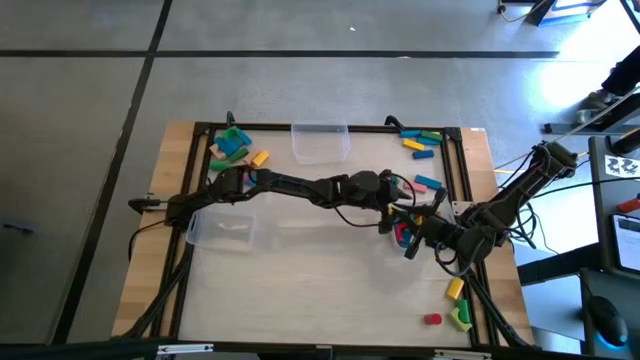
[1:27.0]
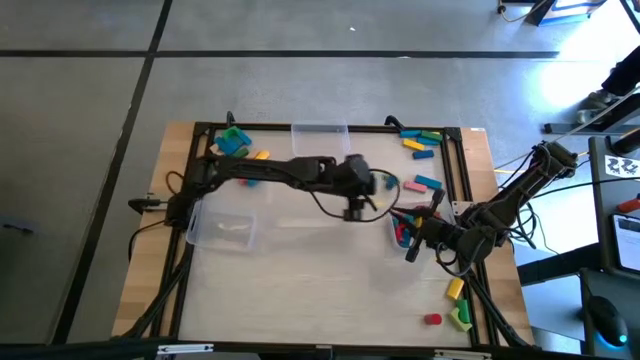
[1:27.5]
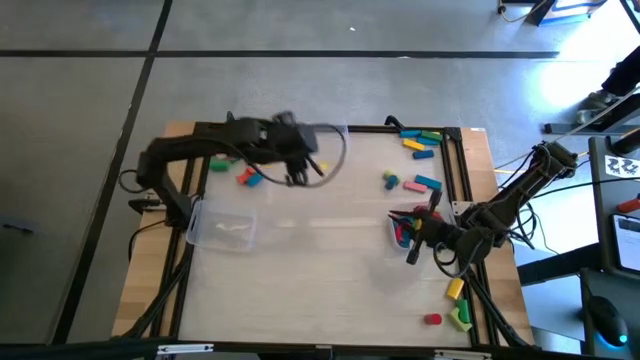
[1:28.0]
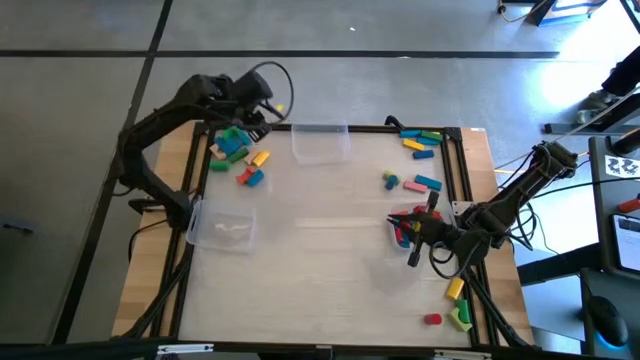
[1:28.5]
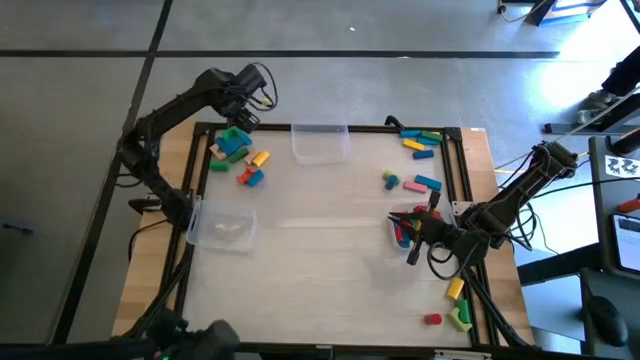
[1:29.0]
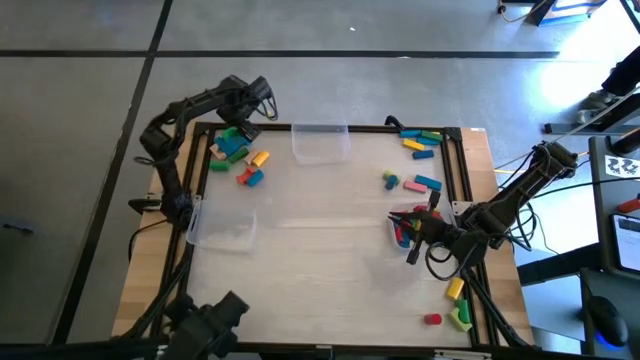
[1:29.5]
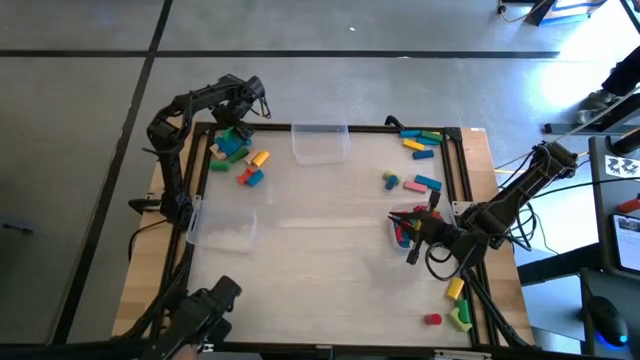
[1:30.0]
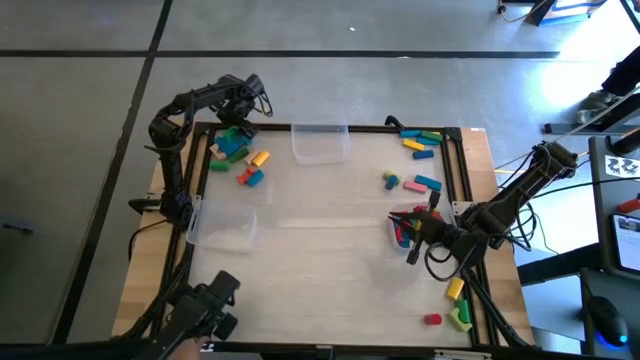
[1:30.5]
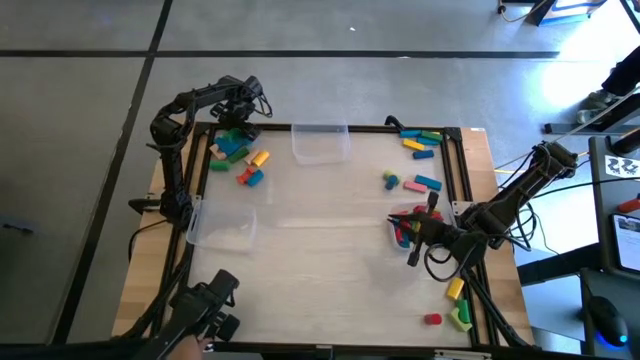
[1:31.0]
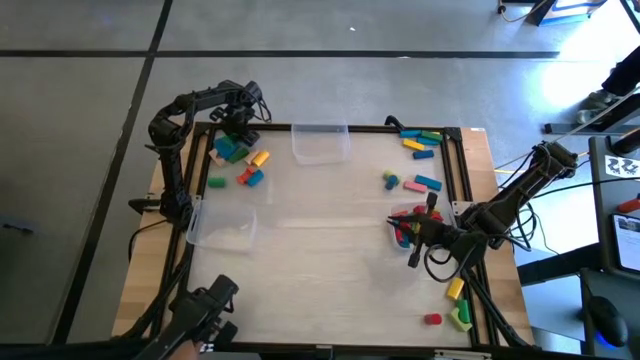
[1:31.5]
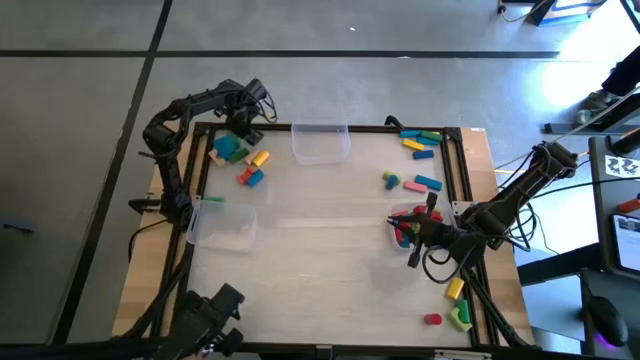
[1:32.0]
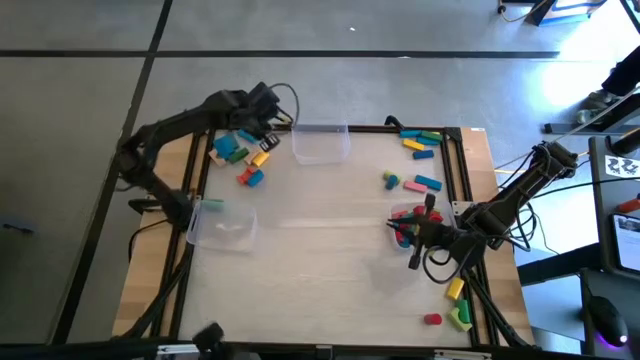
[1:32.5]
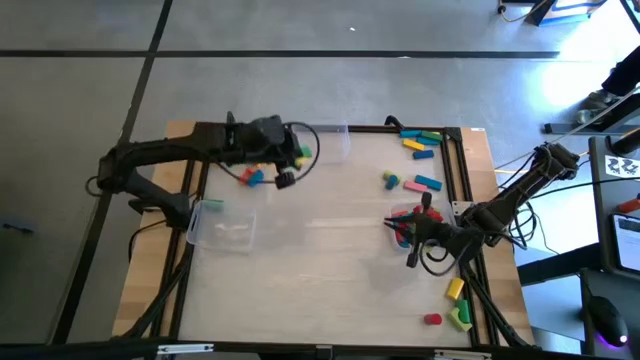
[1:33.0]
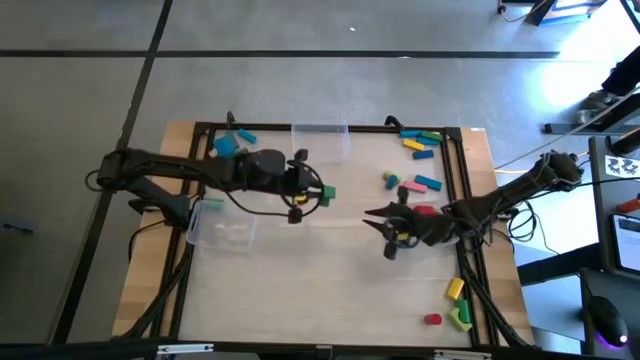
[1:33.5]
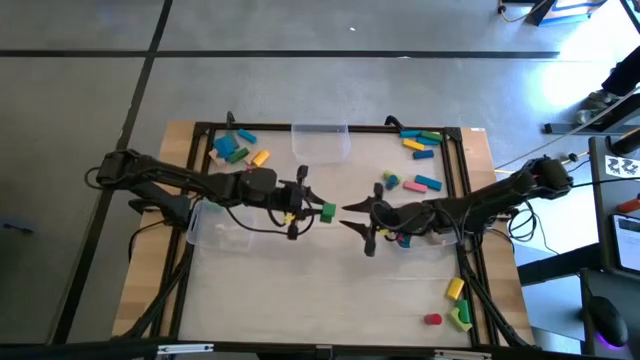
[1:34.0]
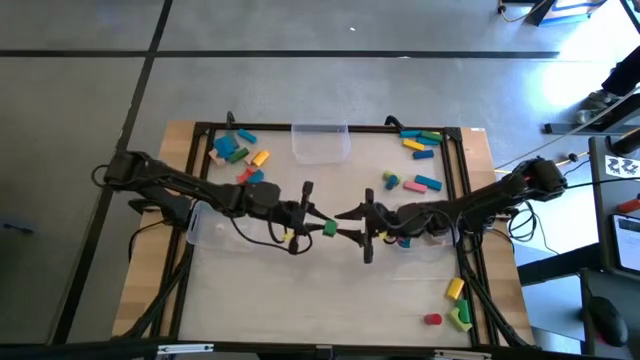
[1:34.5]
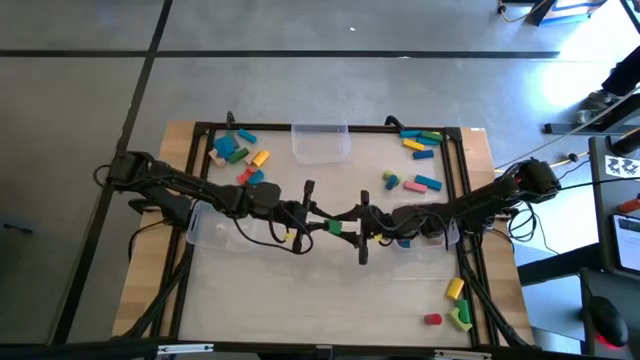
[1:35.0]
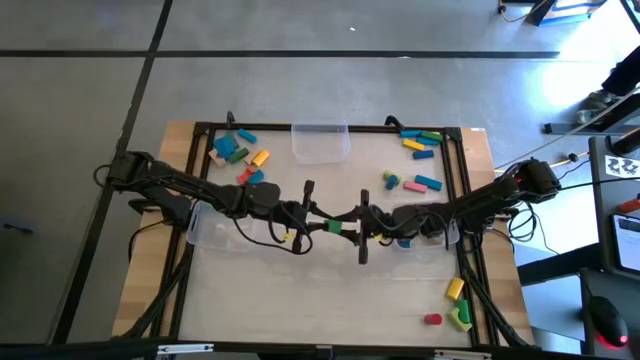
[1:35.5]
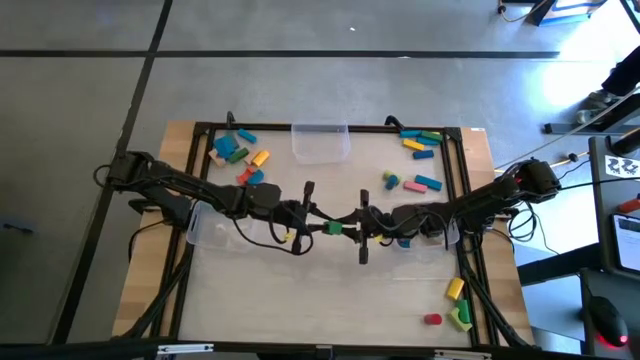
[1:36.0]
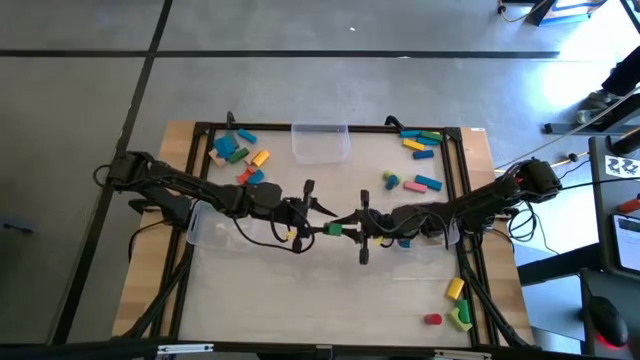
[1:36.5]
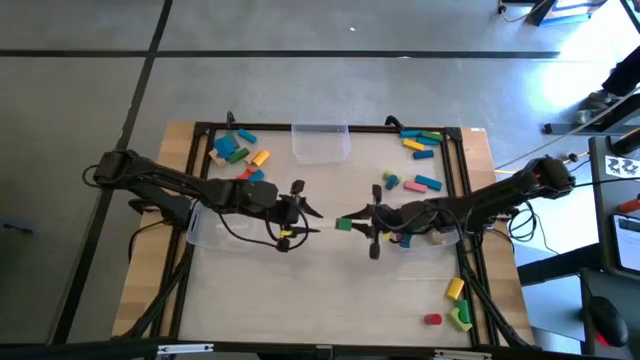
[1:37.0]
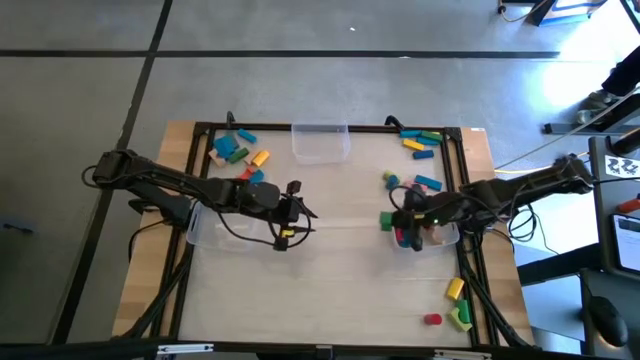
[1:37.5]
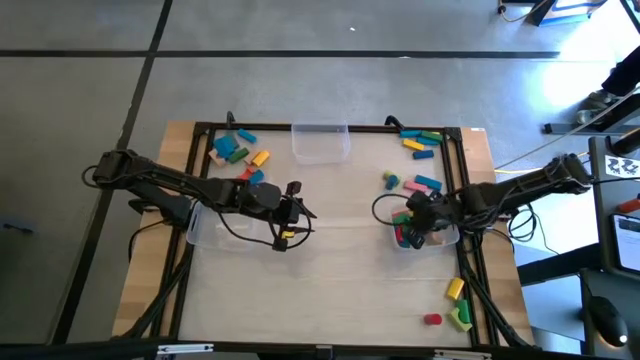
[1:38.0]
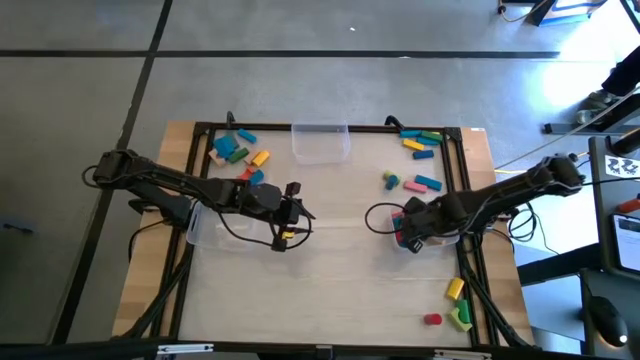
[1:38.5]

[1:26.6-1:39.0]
Task: Sort blocks by size
Put the green arch block into the bottom right transparent bin

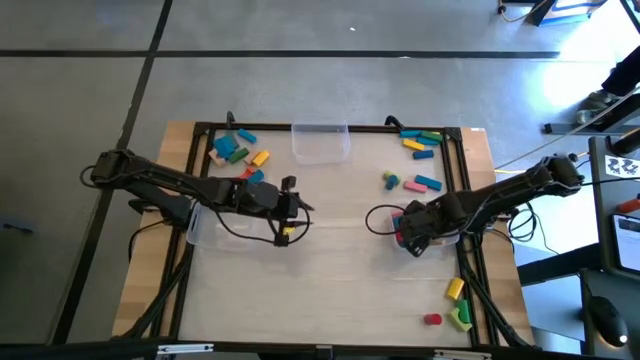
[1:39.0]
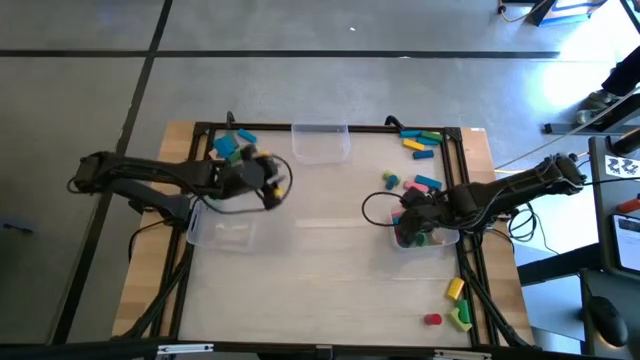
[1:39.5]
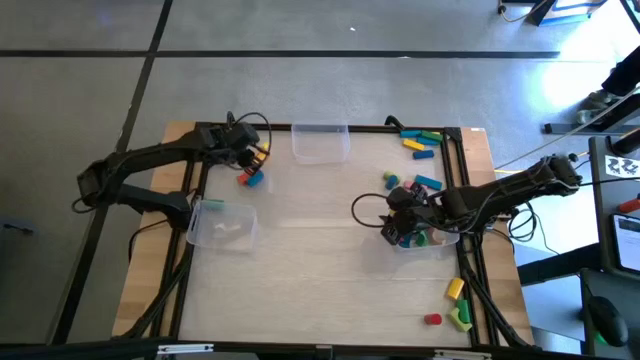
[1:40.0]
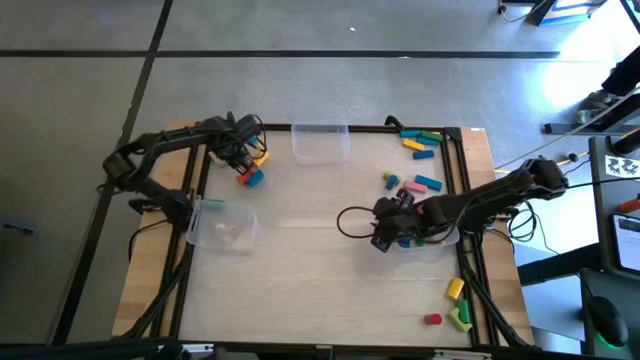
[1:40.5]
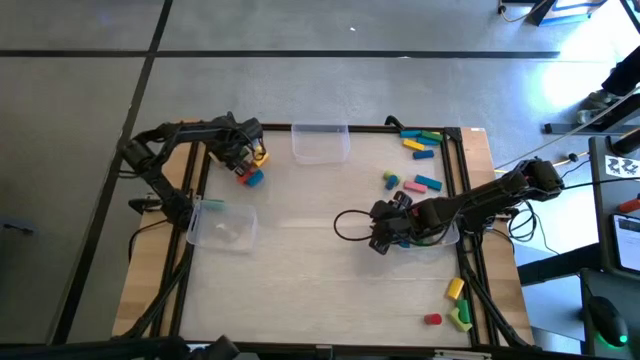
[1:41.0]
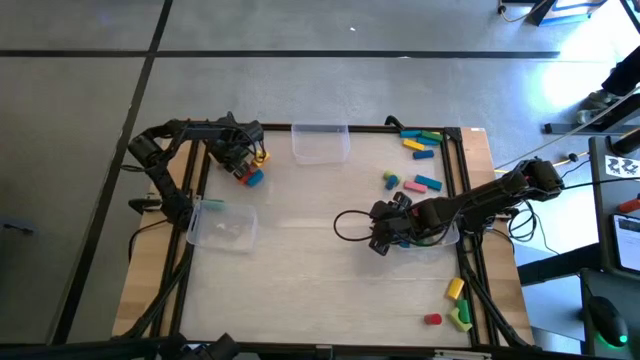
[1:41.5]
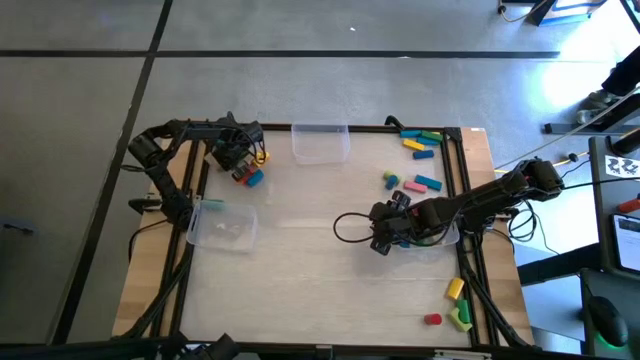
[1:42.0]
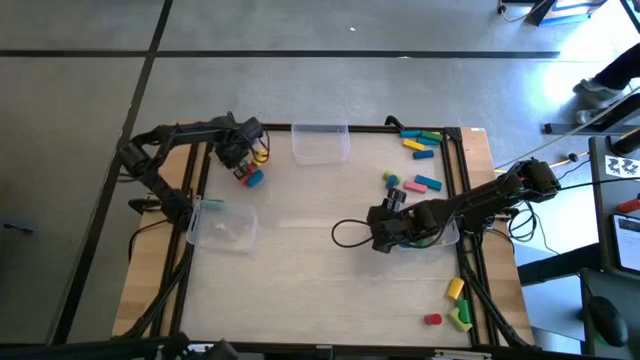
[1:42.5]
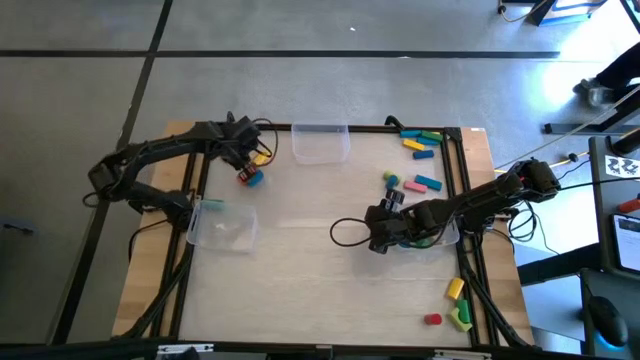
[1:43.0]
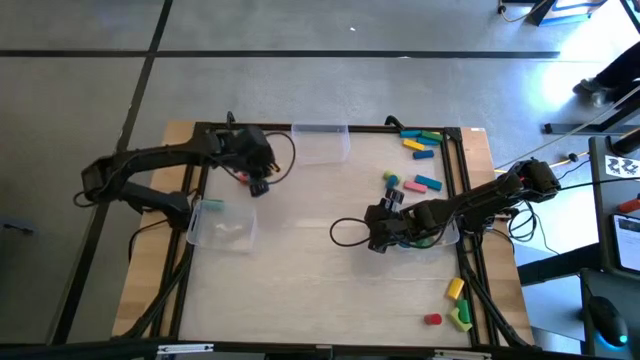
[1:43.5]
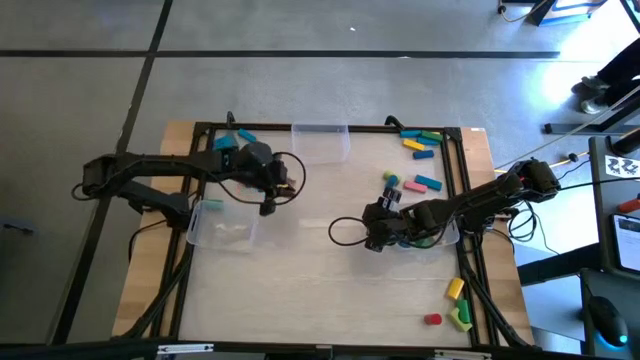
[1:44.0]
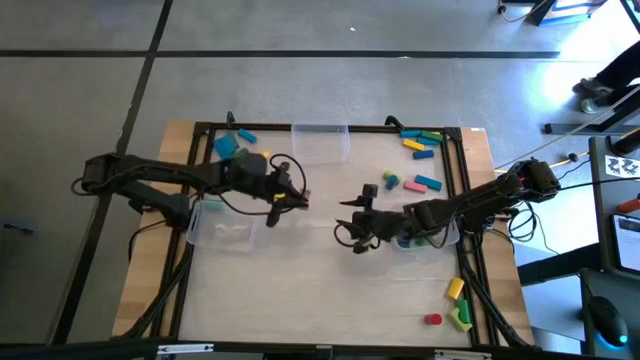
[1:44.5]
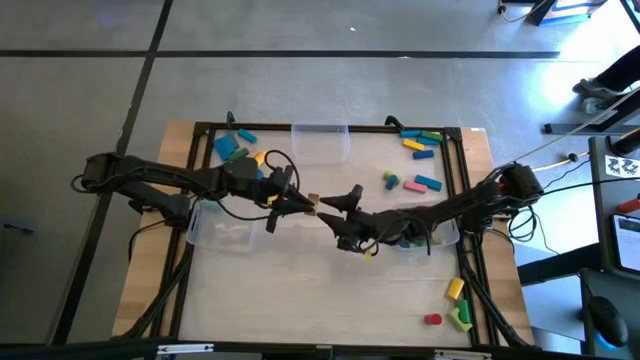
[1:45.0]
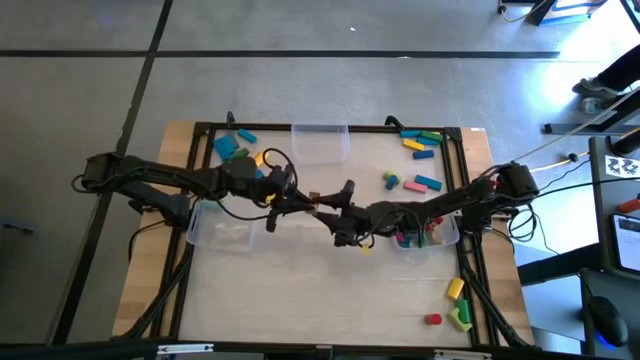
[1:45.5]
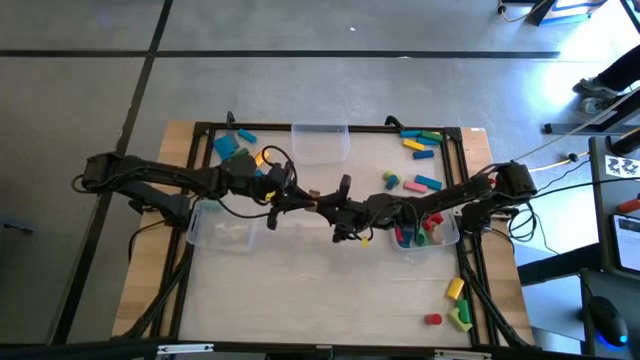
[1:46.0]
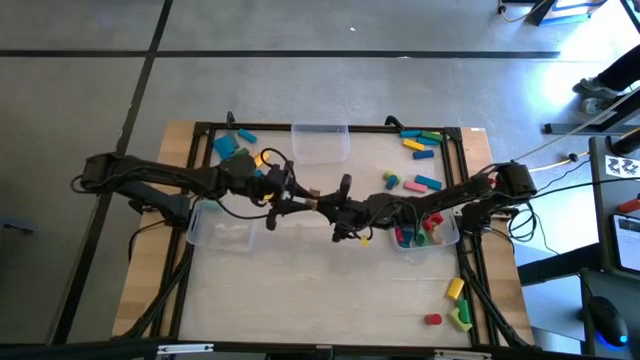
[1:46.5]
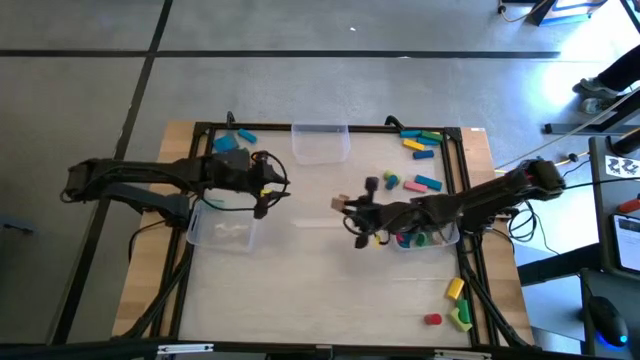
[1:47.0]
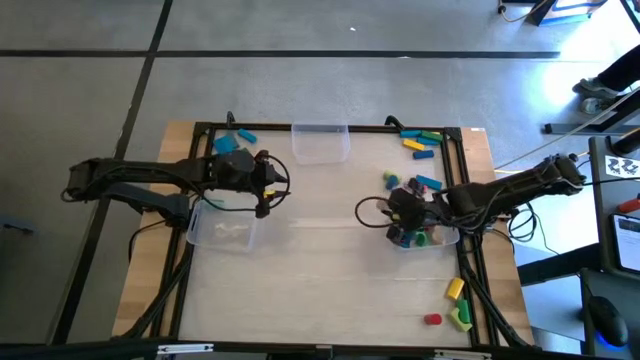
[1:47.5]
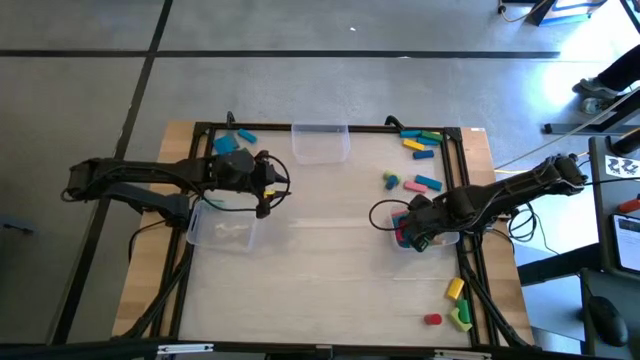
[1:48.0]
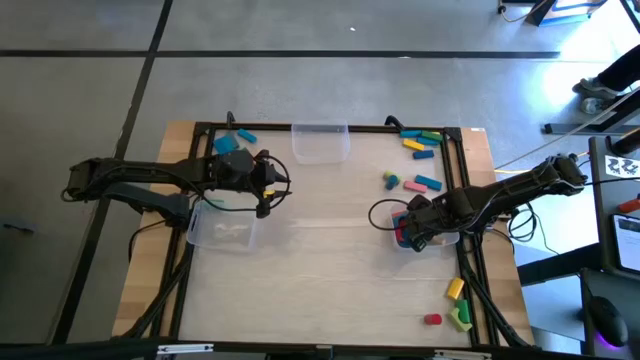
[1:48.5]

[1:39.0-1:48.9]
Put the brown arch block into the bottom right transparent bin
